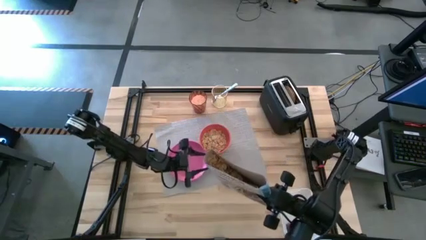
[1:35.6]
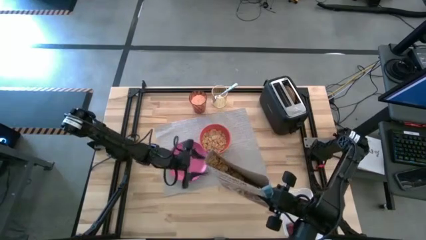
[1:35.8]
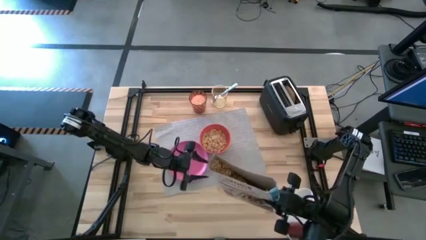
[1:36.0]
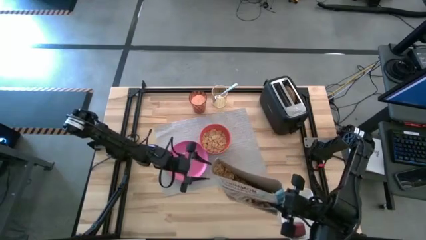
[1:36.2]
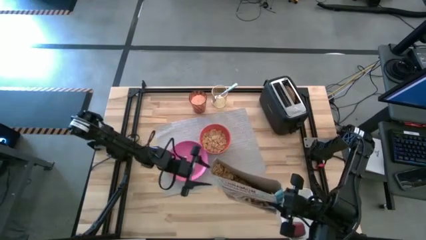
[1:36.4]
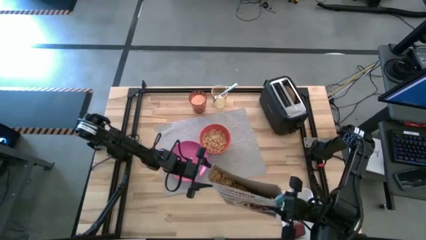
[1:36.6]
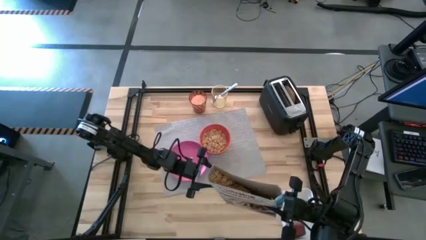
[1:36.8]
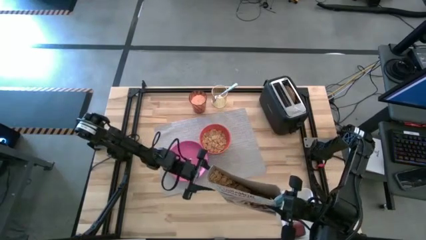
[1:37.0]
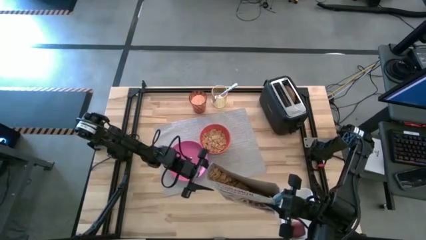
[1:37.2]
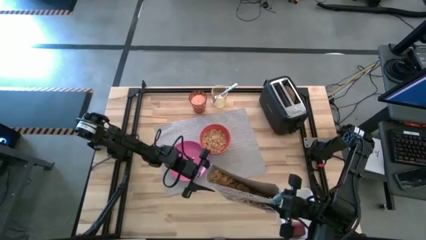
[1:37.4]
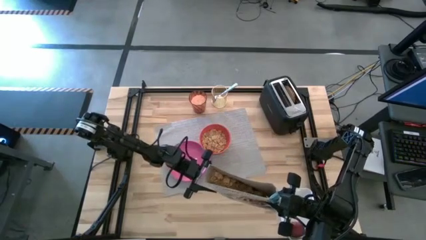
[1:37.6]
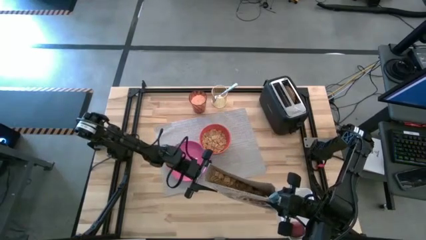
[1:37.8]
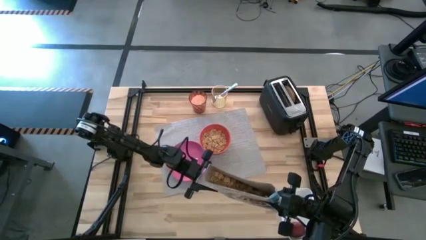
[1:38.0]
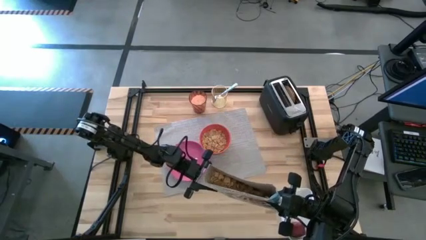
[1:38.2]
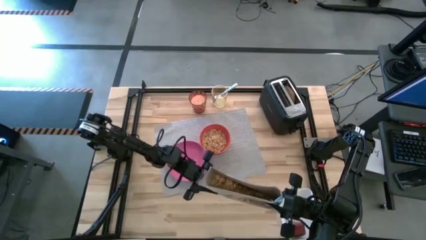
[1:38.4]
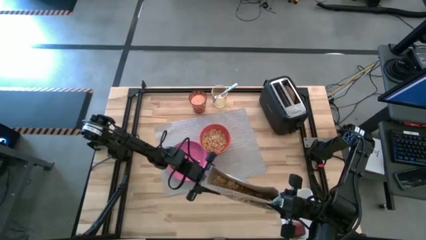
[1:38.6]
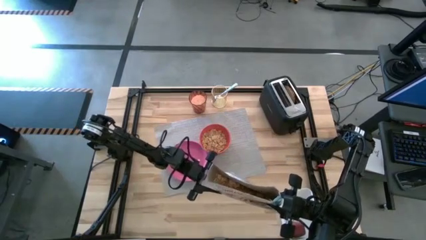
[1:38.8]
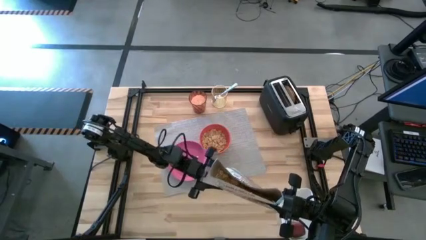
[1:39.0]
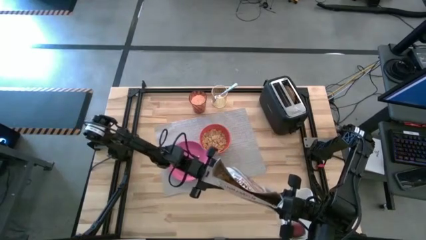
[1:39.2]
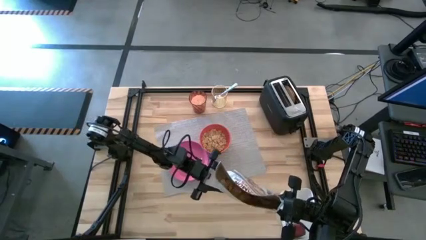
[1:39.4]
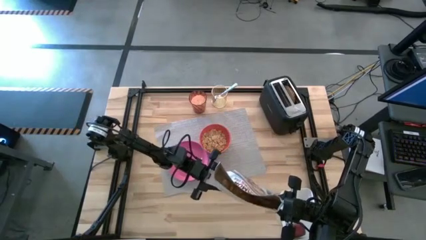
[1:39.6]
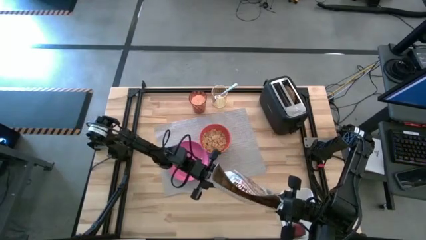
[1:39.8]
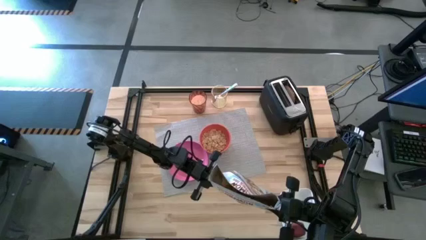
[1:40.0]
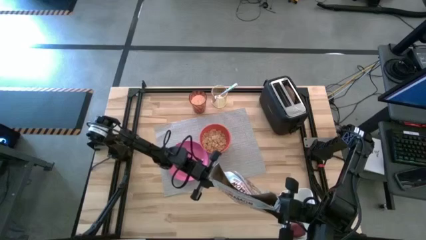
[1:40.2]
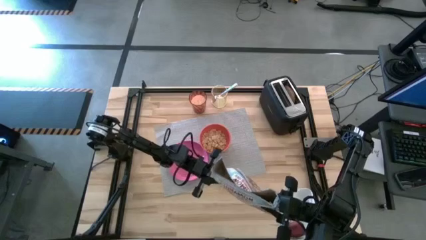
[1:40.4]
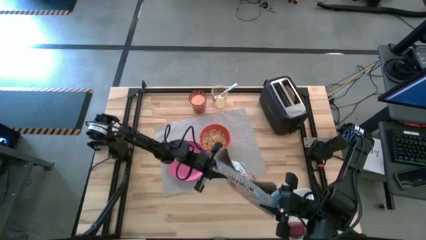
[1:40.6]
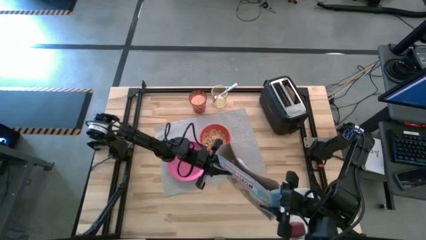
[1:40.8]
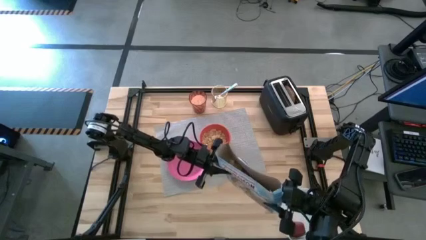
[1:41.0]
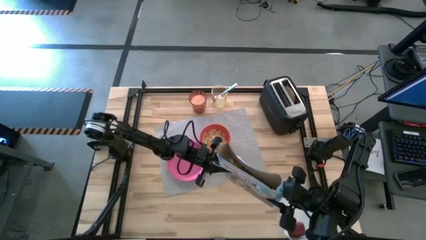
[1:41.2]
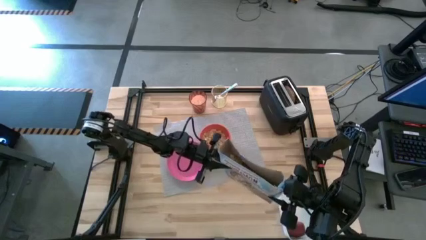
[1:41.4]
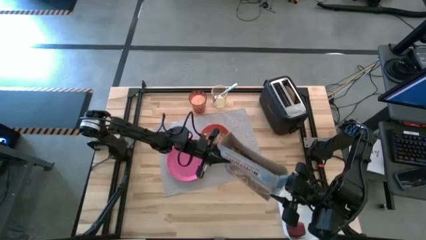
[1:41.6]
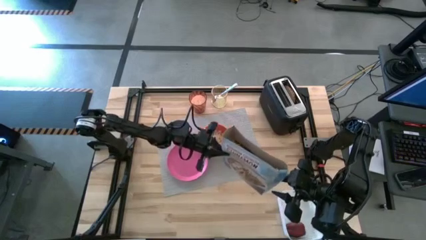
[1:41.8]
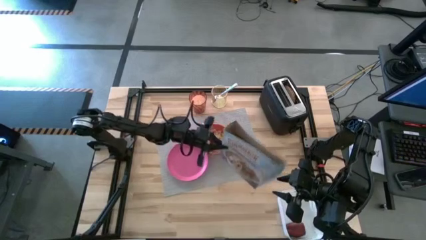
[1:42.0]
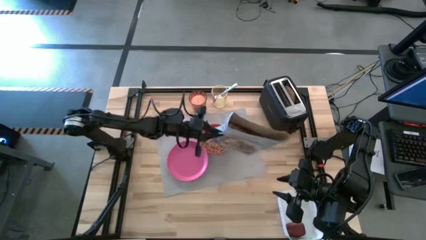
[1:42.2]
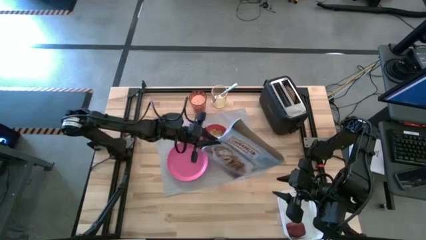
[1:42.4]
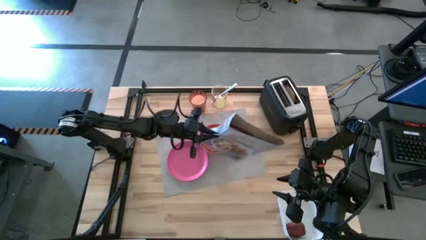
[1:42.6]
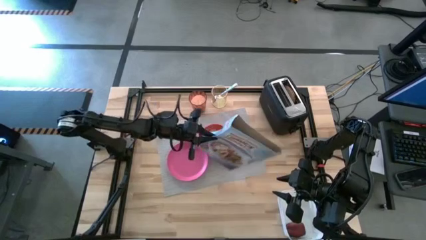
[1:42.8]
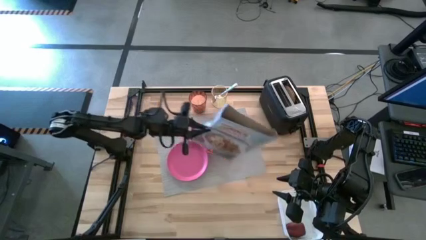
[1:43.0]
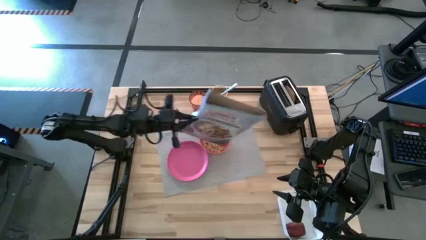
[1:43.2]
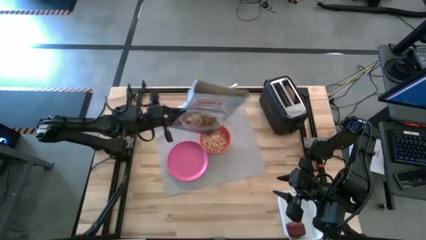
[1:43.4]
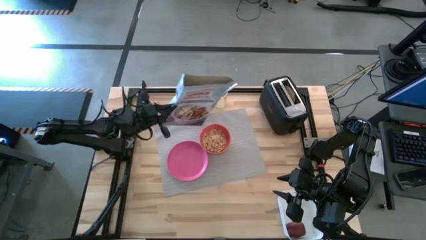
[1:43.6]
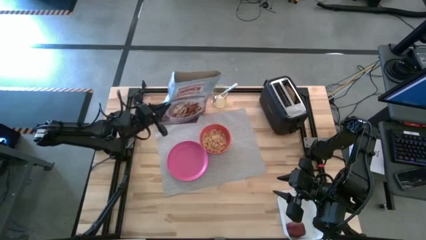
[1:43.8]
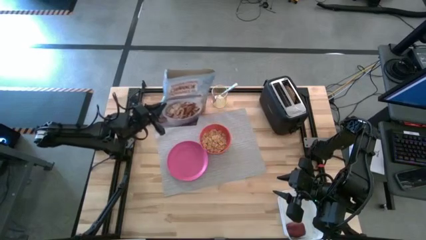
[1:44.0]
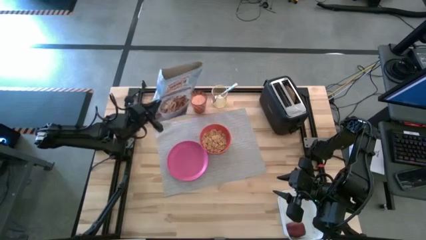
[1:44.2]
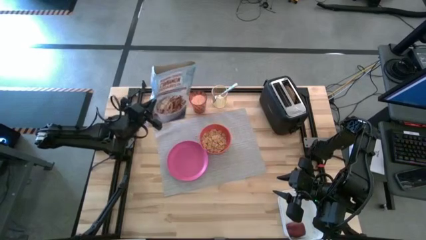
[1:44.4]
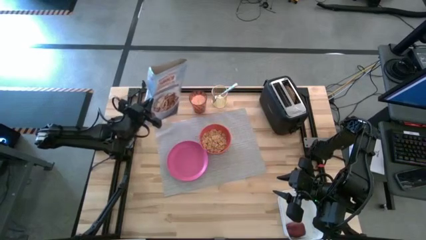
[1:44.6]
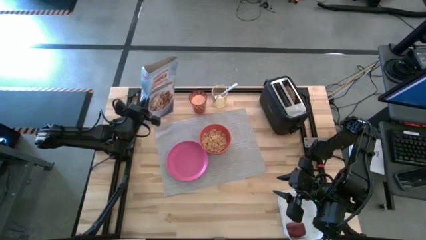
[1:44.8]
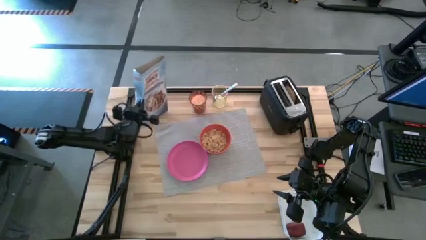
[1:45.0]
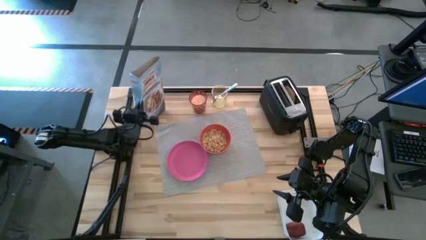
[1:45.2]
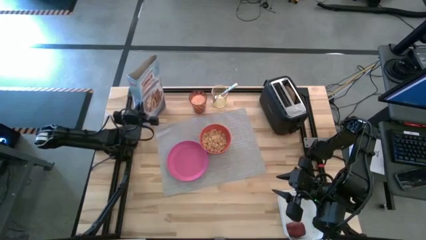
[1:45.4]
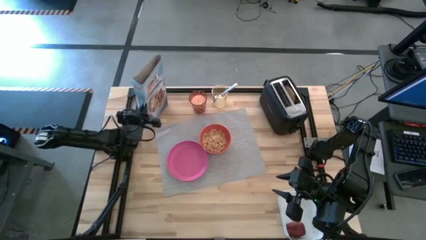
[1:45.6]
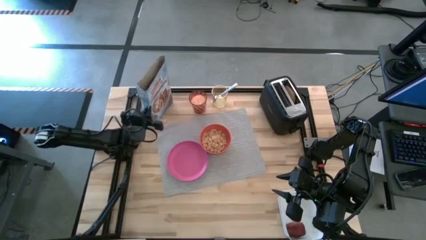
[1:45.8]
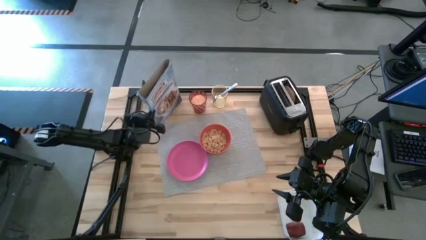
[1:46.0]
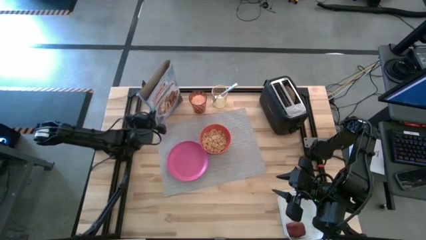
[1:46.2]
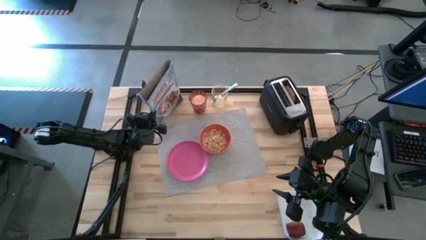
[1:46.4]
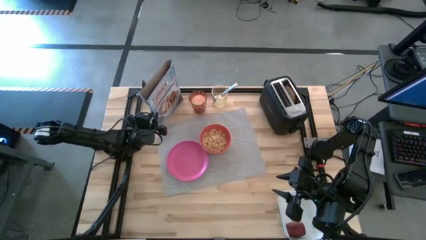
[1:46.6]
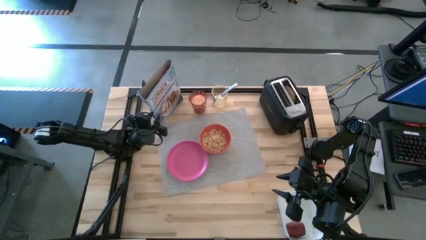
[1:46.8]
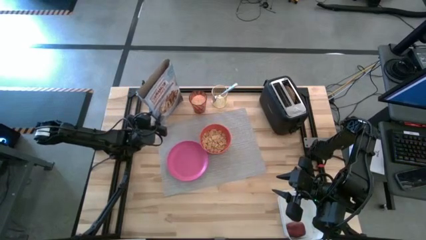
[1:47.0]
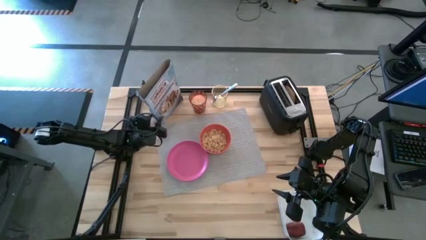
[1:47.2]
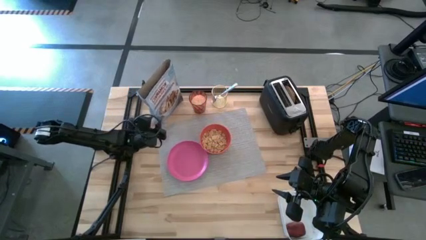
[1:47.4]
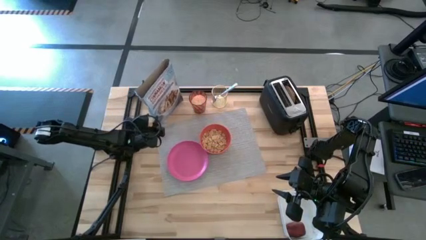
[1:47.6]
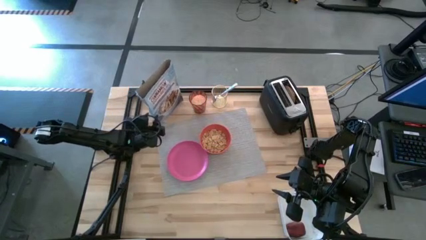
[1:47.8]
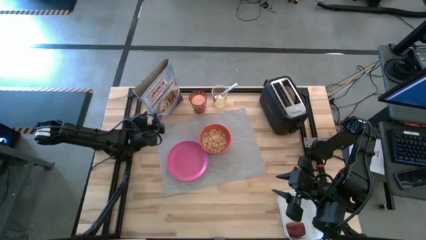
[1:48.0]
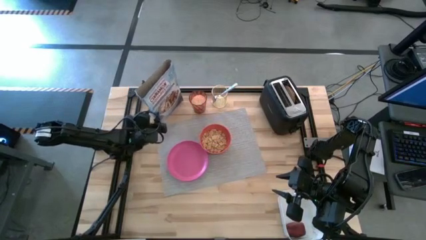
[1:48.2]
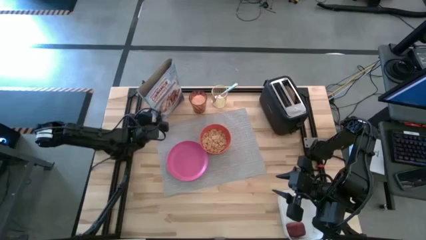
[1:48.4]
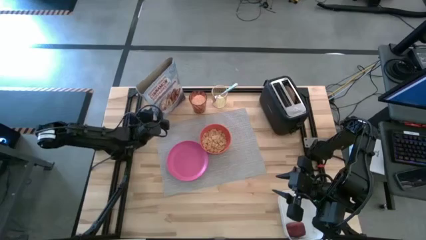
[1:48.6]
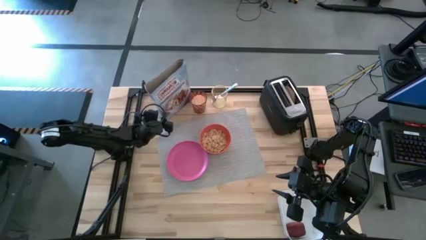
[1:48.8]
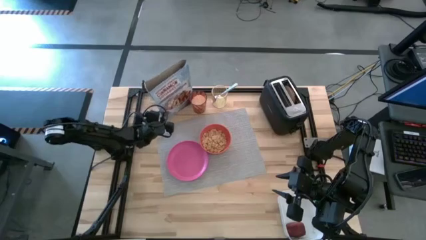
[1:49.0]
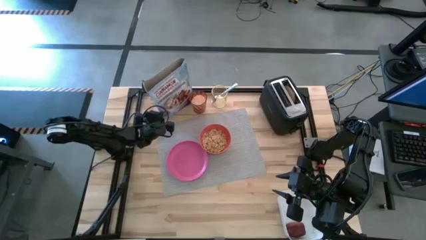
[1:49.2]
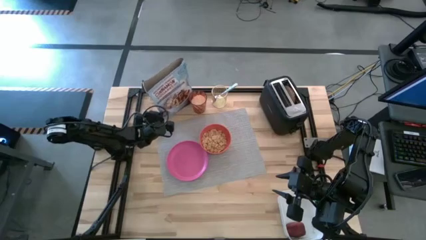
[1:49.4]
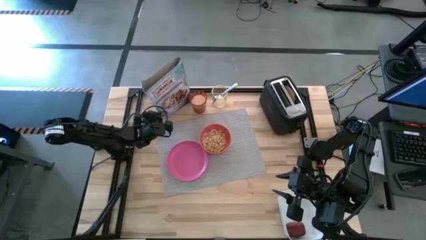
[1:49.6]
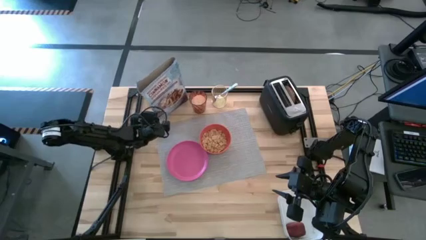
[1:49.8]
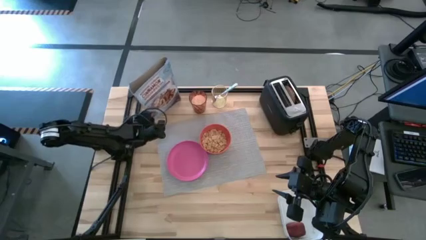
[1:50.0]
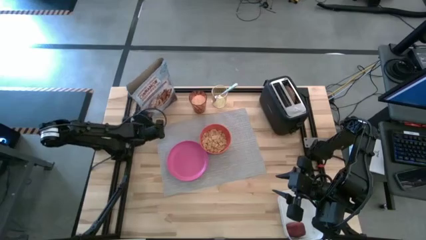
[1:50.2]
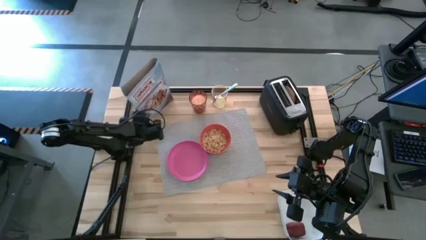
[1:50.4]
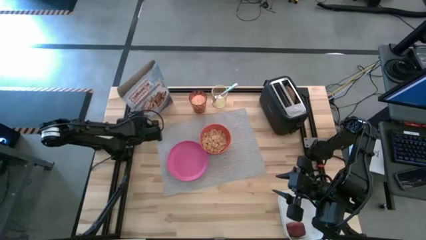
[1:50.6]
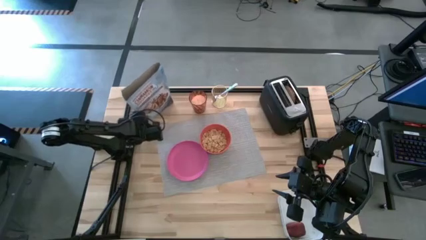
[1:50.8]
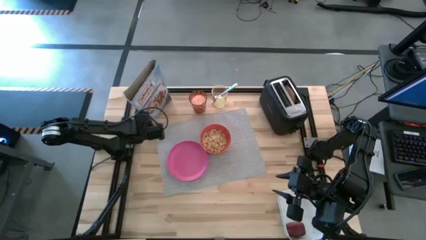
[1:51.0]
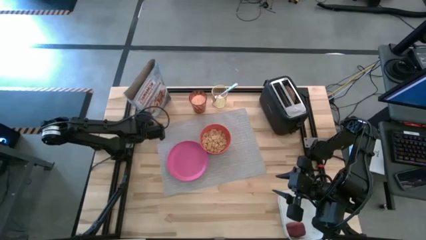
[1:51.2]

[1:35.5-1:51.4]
Task: Arrange a breakfast setting
Pour the cereal from the cereal box into the orange bowl
